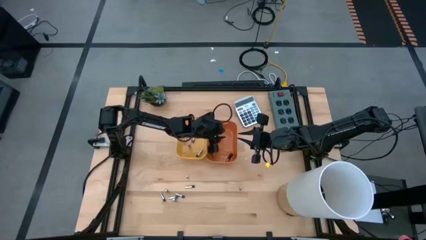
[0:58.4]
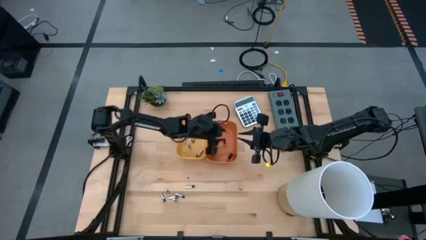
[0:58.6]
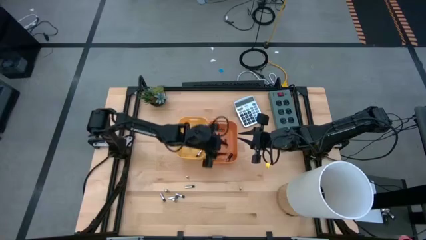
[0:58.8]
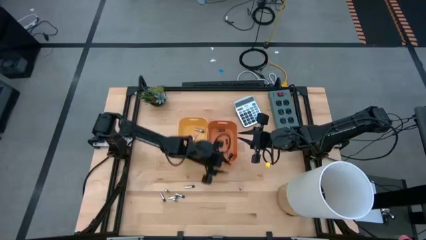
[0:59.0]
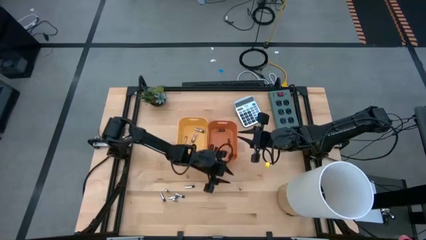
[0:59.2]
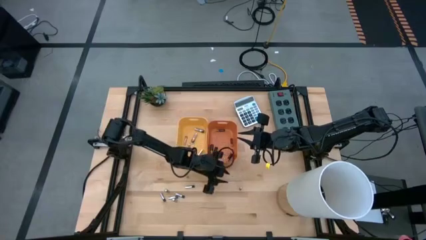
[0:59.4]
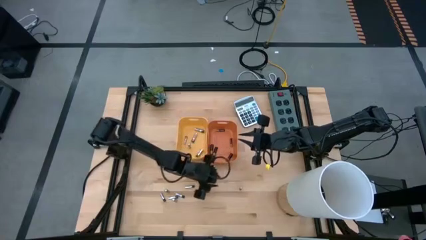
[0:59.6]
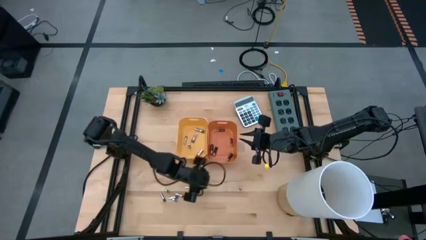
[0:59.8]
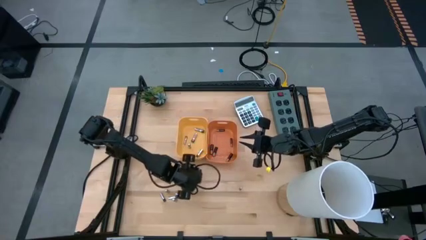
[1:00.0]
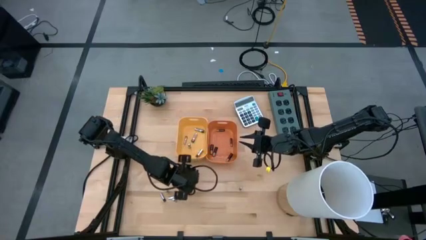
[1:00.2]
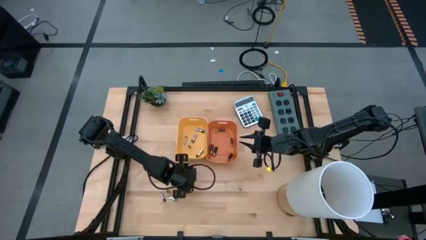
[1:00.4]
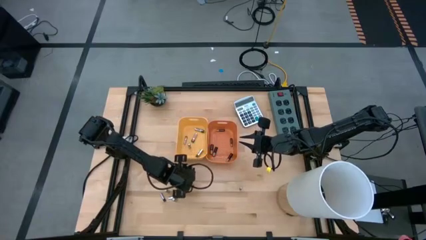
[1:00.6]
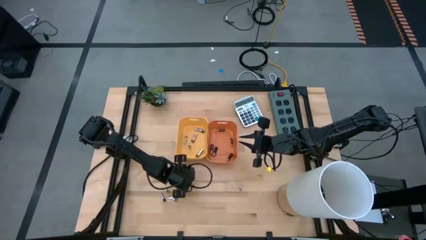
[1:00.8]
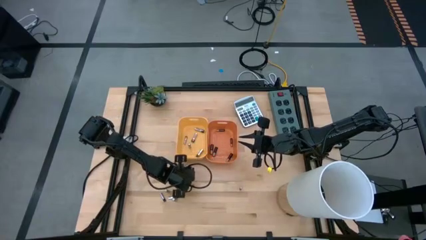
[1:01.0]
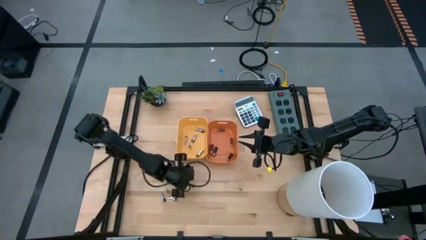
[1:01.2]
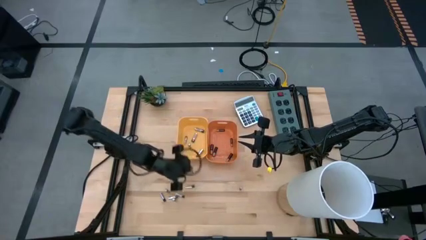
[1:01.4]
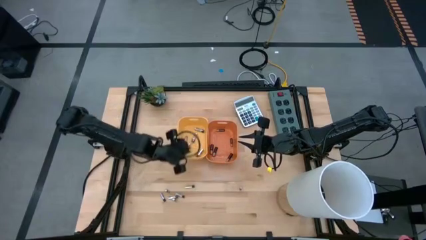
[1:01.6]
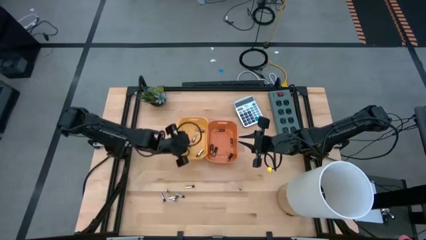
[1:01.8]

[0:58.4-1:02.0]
Task: Sort batteries
Put the silver battery into the yellow bin

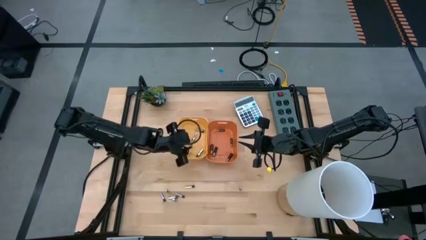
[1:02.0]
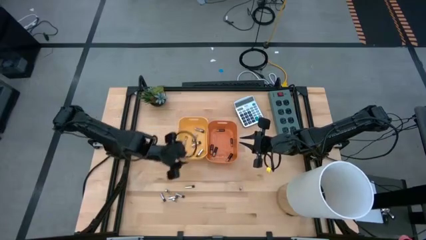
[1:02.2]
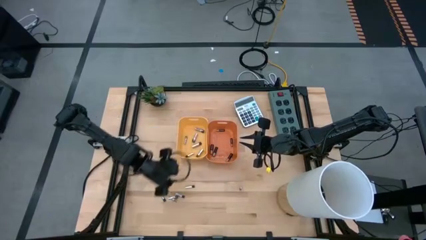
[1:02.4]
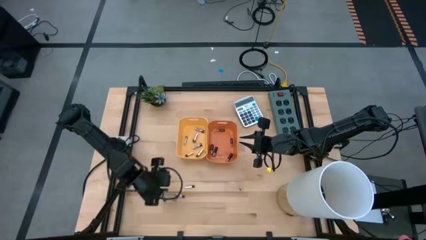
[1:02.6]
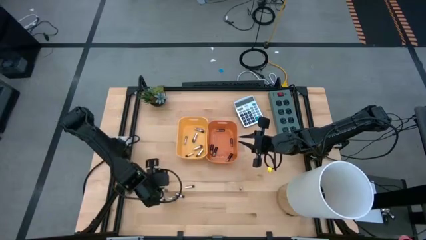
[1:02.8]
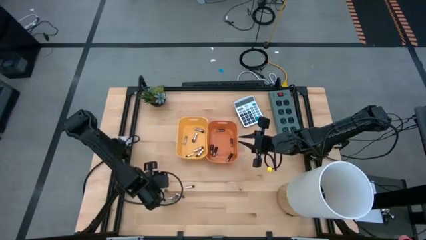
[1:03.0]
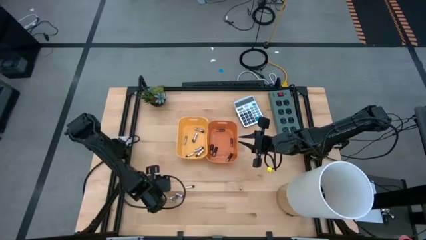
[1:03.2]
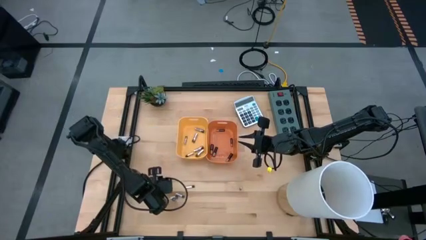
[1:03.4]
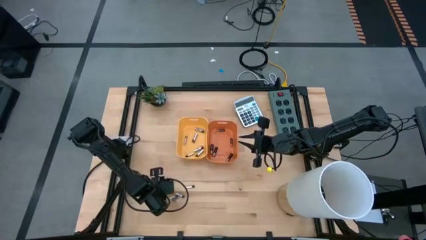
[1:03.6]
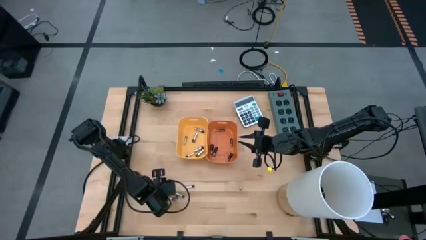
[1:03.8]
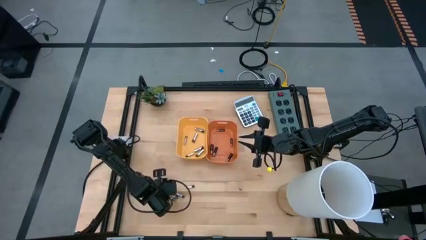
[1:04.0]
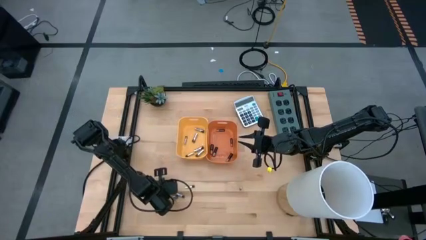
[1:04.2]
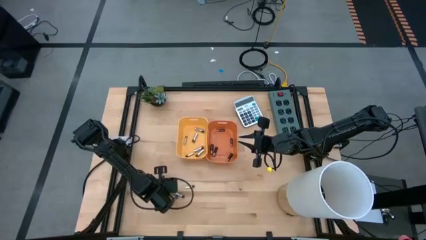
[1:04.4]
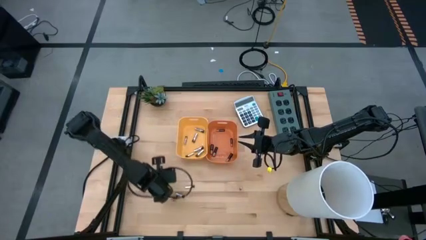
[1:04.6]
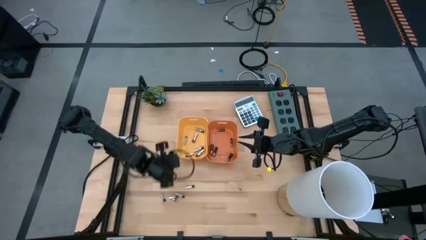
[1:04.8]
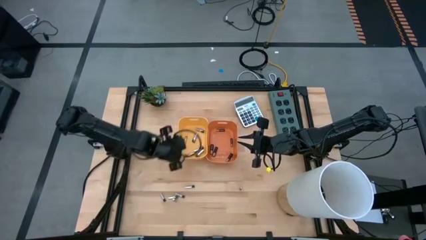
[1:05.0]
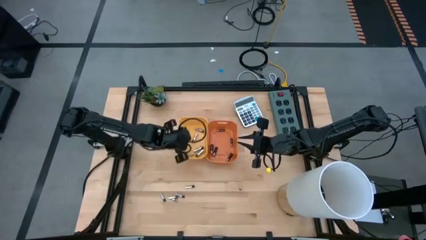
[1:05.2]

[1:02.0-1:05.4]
Put the silver battery into the yellow bin

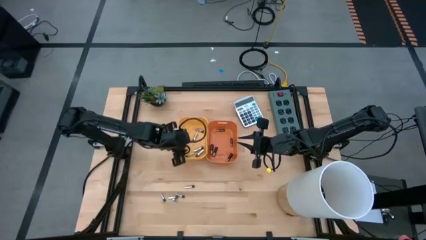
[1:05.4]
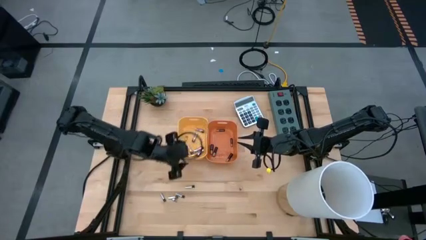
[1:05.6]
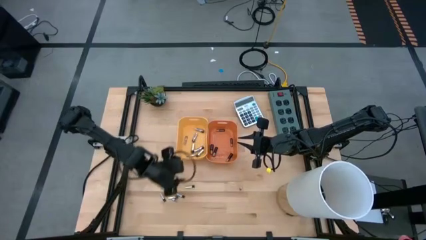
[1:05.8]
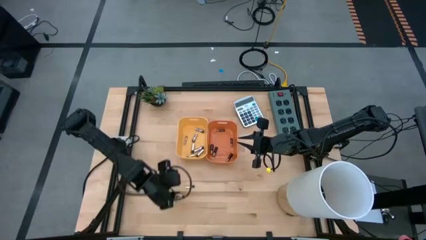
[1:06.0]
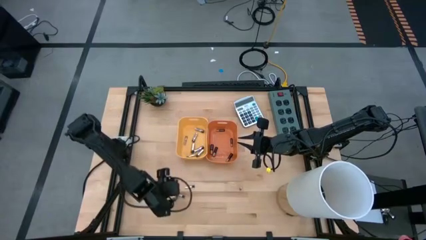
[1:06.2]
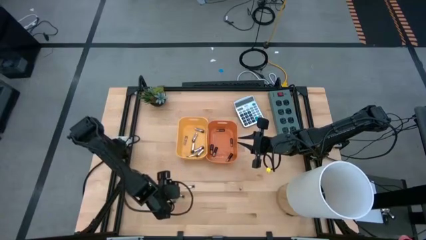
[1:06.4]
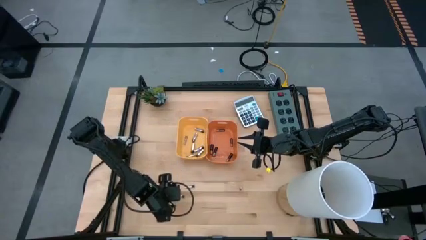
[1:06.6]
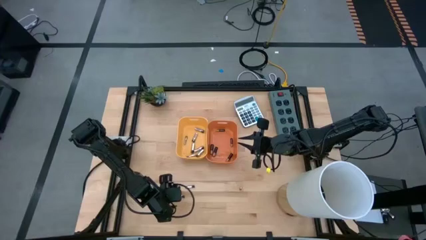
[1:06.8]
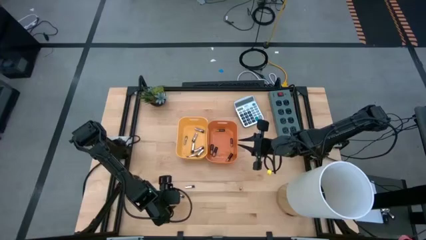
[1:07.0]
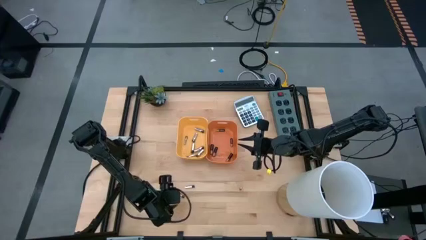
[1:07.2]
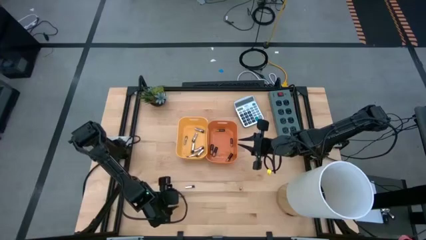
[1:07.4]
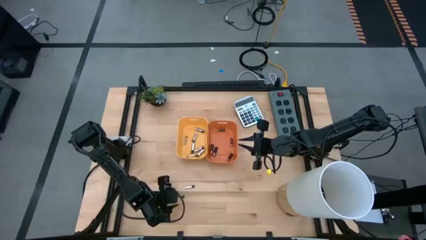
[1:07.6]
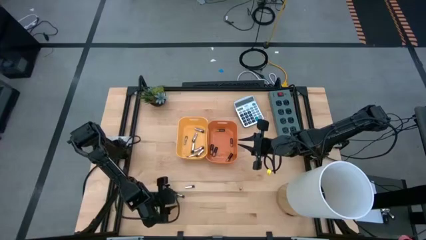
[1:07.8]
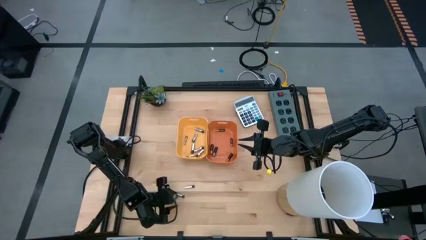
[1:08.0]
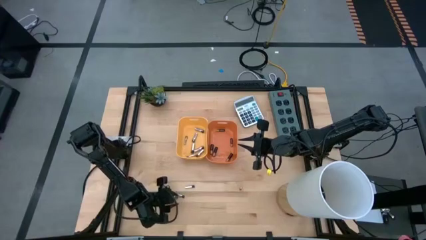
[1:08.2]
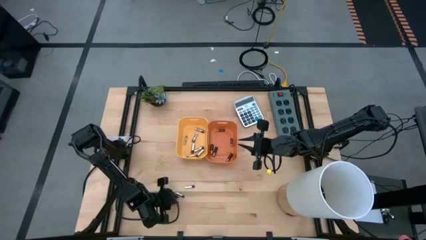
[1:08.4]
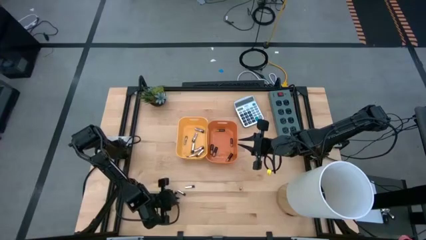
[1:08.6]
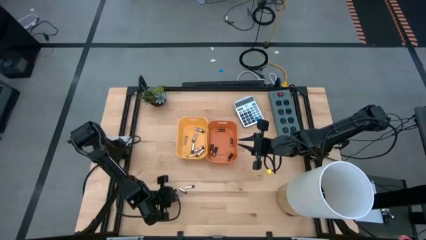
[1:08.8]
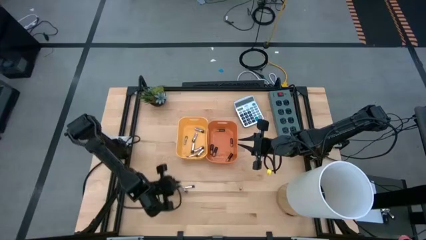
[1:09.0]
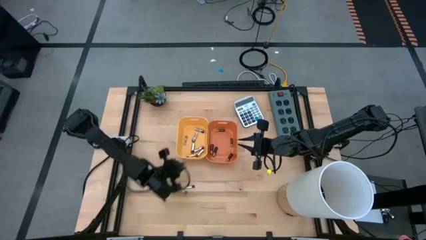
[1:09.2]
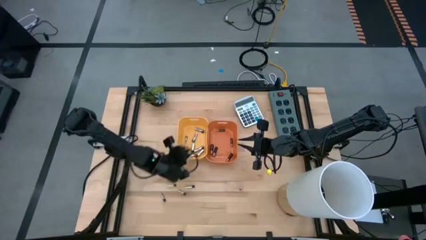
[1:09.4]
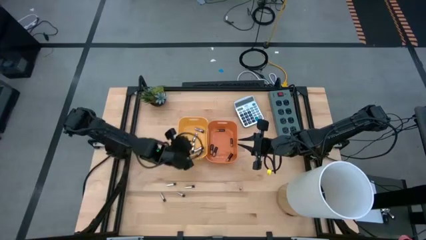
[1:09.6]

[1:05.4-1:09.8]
Put the silver battery into the yellow bin

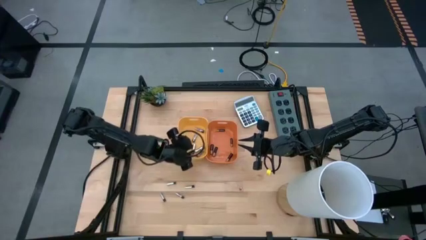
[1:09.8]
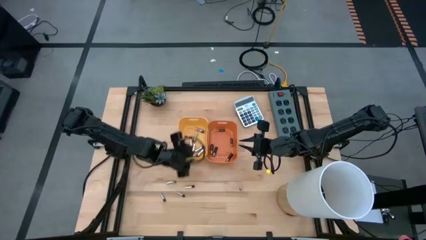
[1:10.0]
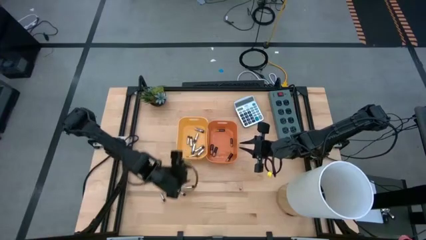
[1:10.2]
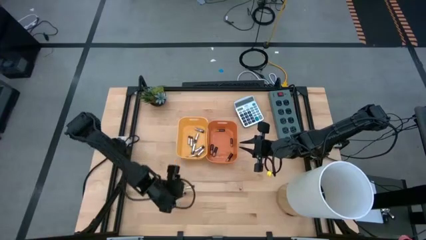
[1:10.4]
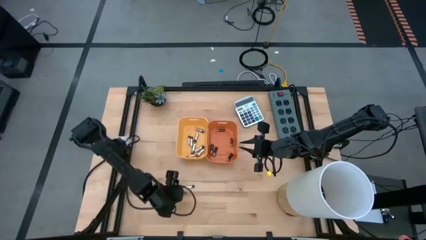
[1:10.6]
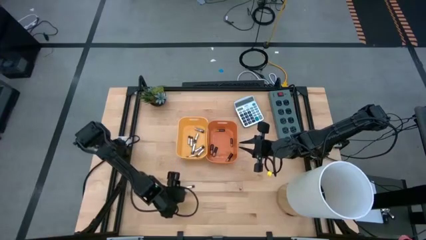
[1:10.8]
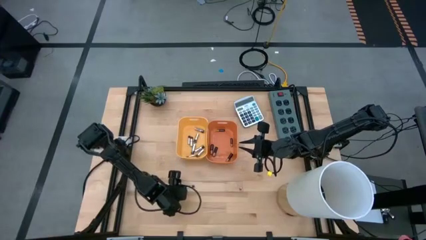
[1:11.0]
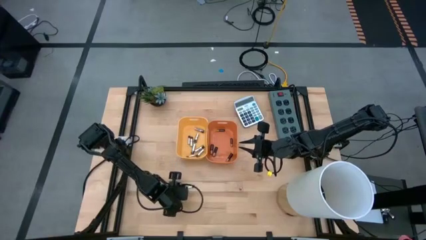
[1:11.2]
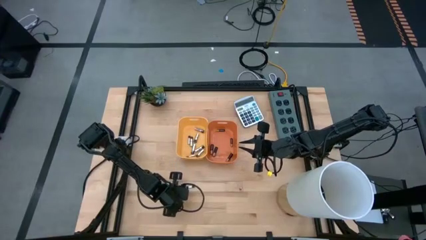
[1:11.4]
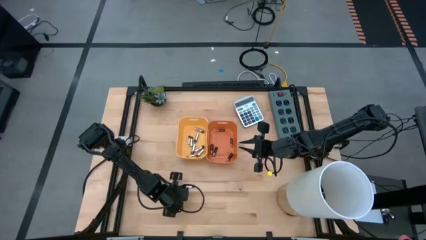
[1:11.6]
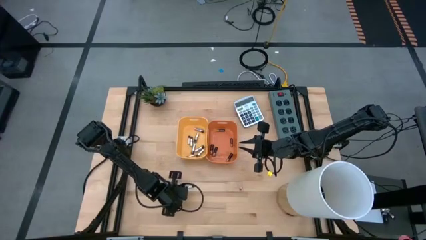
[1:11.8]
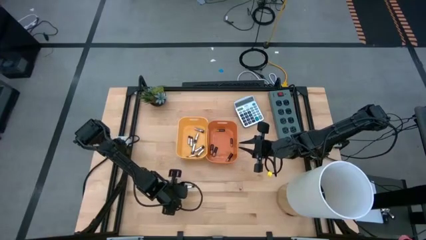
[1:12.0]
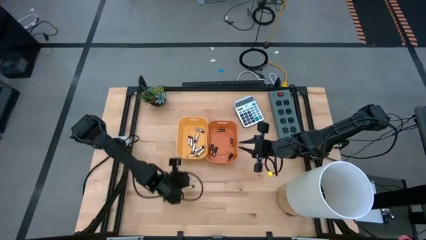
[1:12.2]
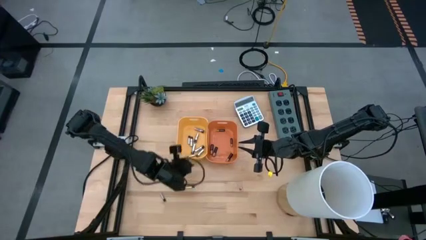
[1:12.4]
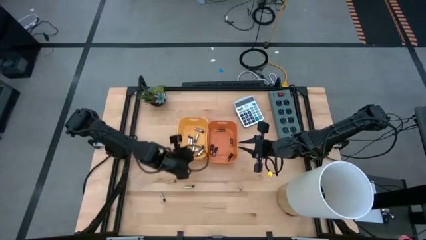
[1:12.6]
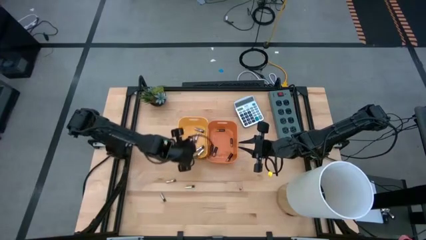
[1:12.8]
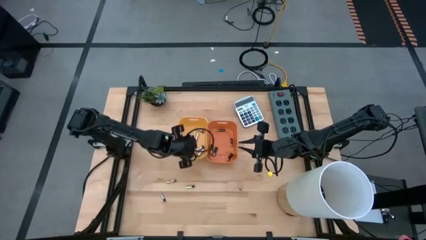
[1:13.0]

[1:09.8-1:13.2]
Put the silver battery into the yellow bin

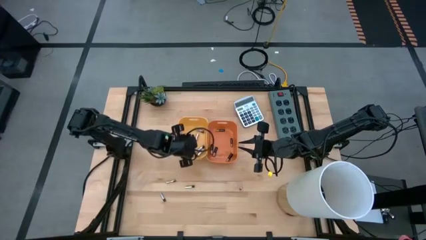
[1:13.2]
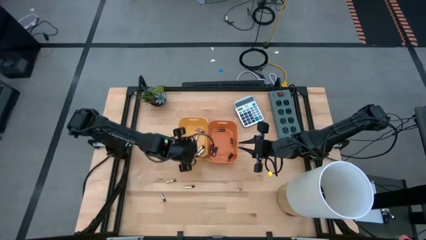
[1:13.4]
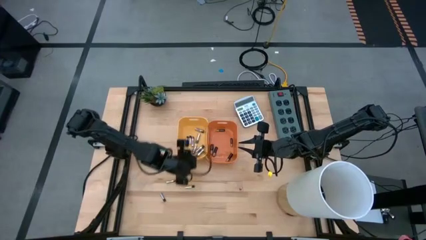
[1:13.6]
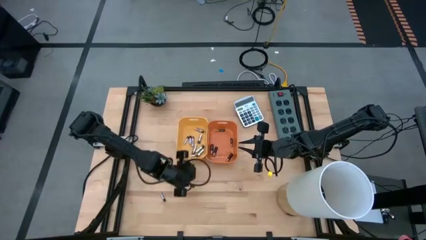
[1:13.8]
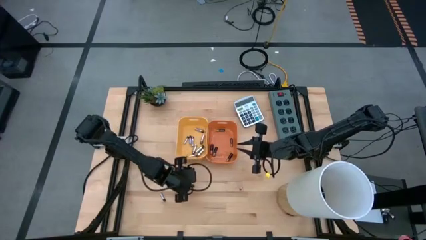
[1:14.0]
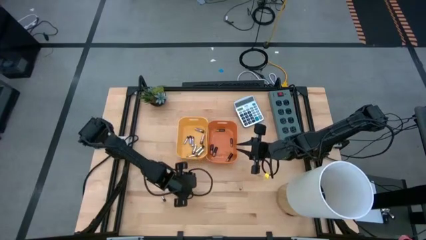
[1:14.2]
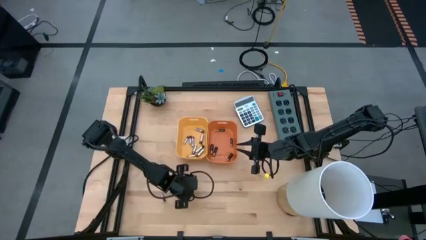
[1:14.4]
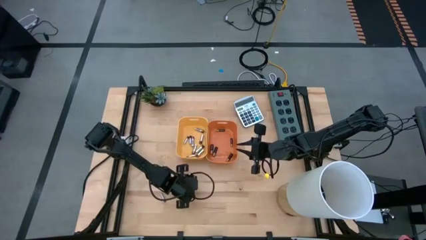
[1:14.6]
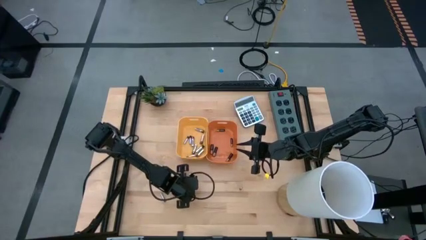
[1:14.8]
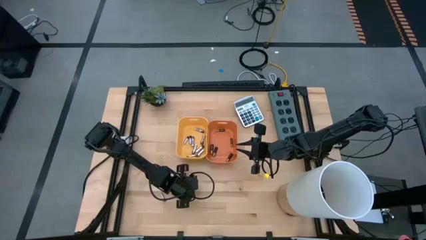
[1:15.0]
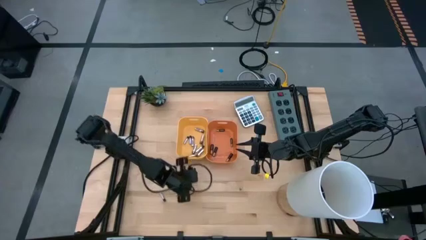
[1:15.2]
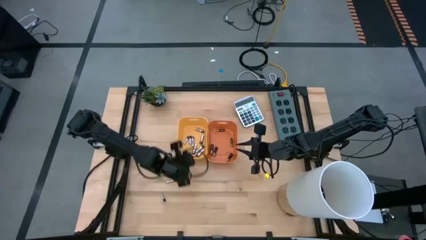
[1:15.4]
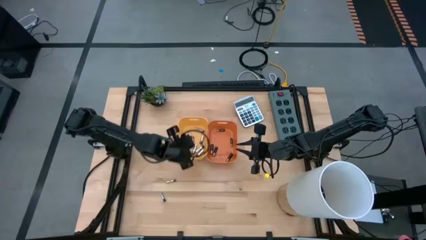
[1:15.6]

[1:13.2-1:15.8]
Put the silver battery into the yellow bin
